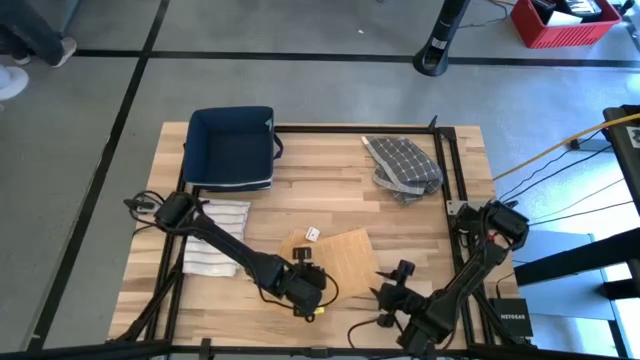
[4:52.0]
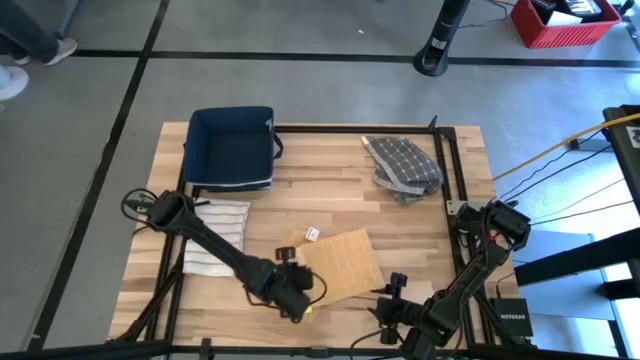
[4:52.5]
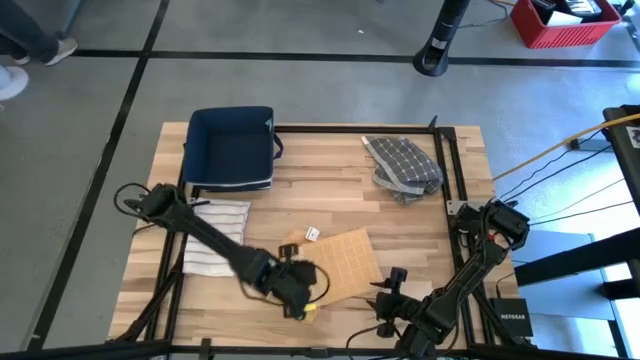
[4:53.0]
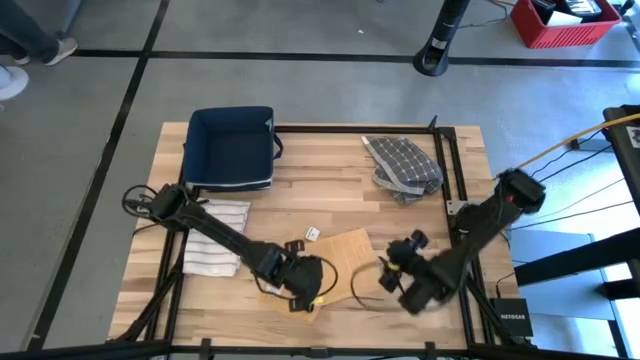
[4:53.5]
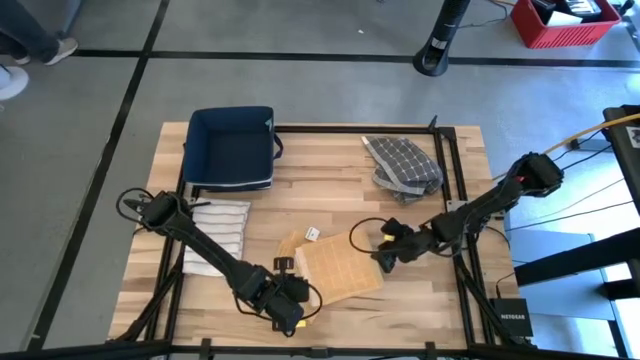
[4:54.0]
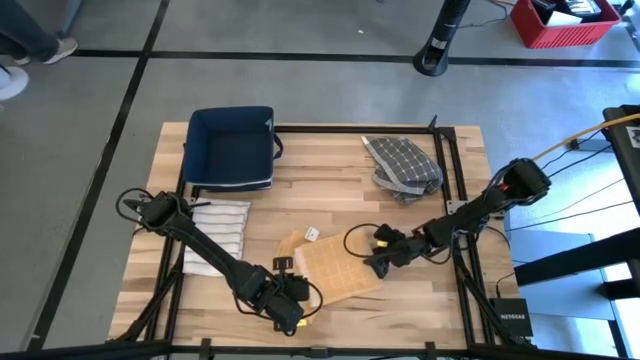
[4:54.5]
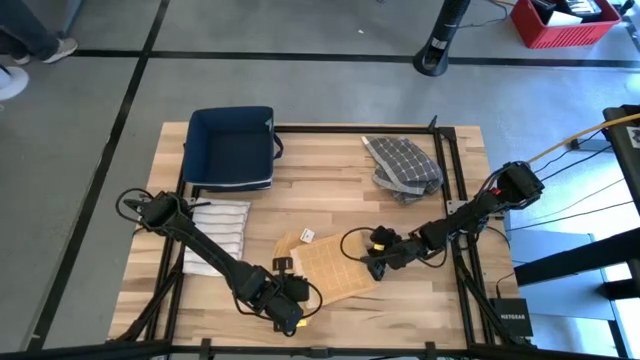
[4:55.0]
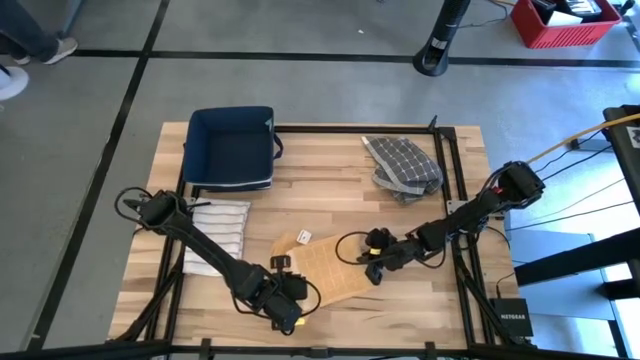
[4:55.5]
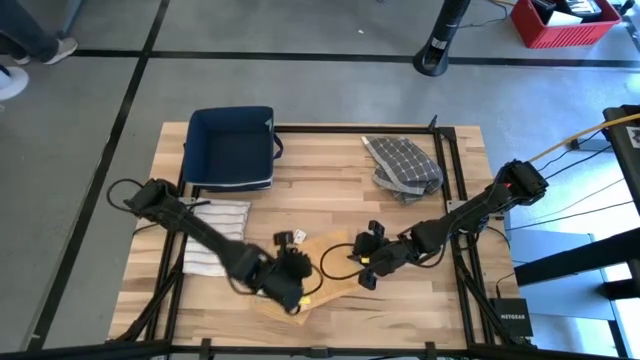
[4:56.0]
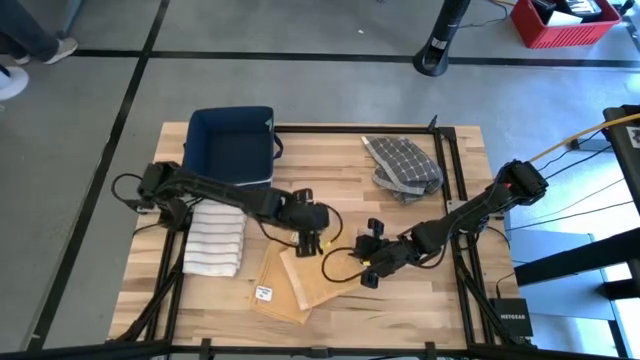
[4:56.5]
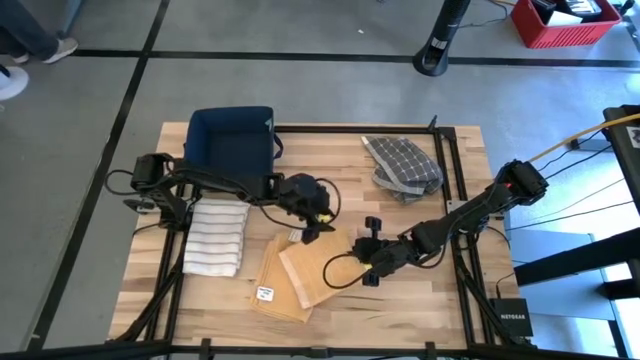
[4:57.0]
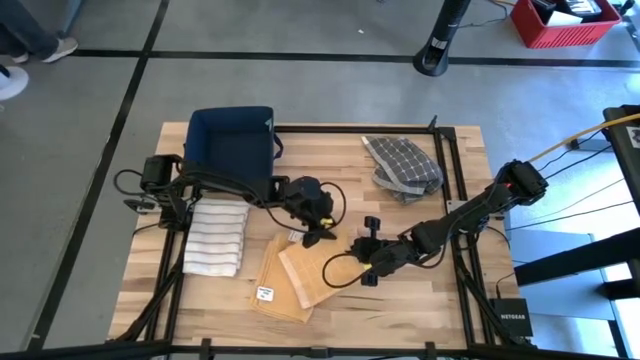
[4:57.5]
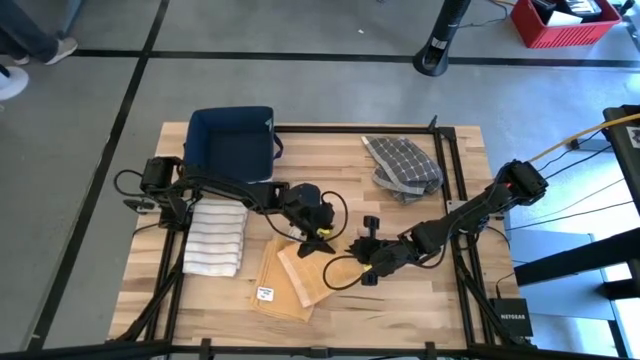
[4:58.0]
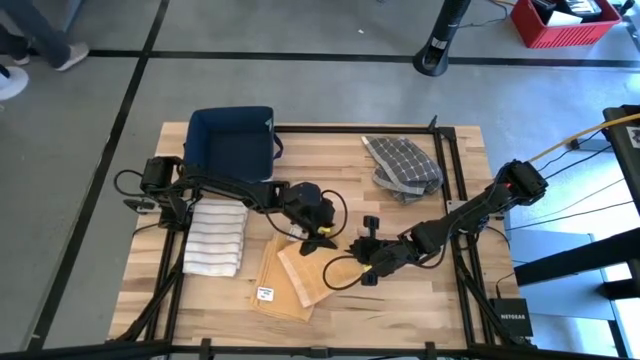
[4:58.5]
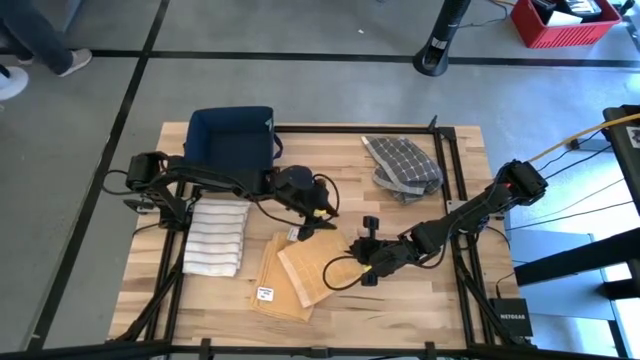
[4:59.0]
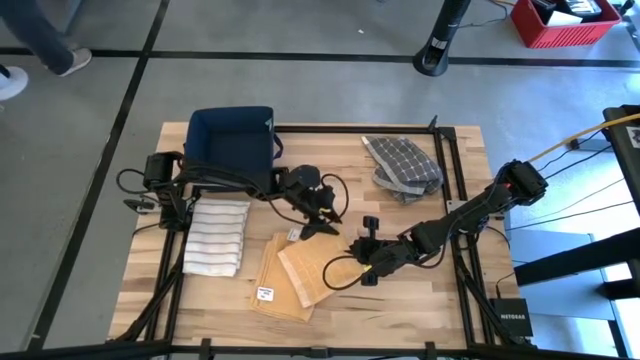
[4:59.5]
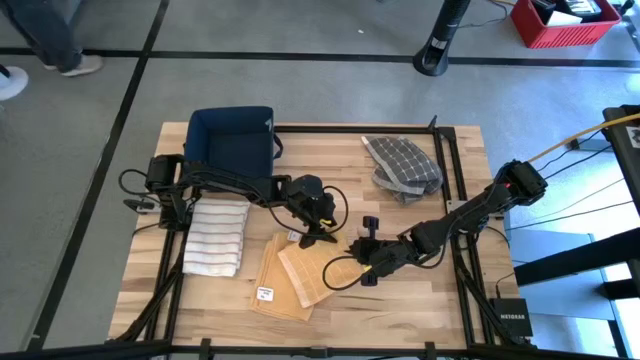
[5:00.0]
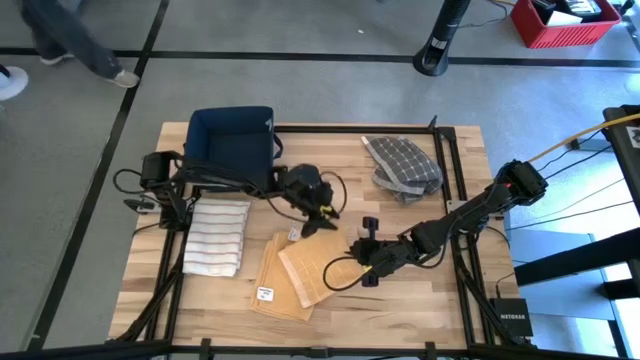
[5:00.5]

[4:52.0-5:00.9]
Task: Fold towel
Stack the orange pattern towel on top of the orange towel

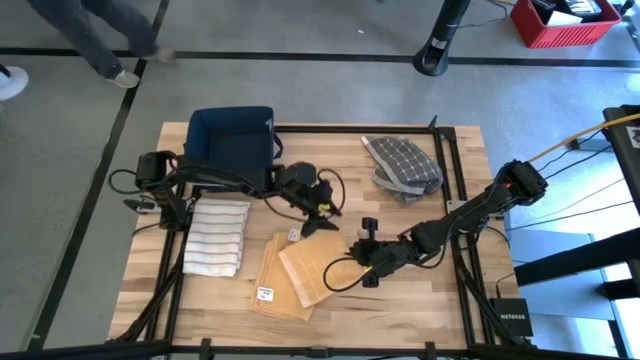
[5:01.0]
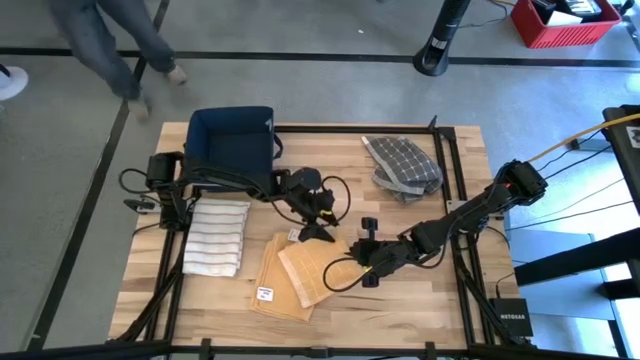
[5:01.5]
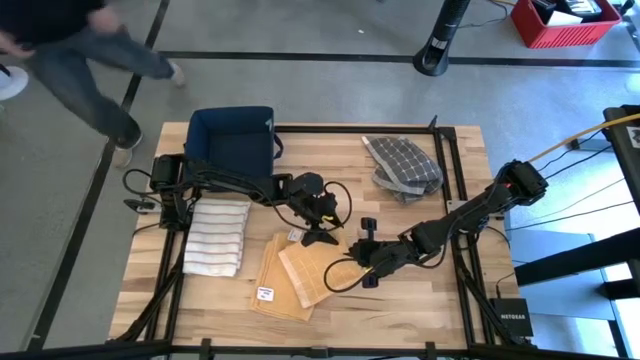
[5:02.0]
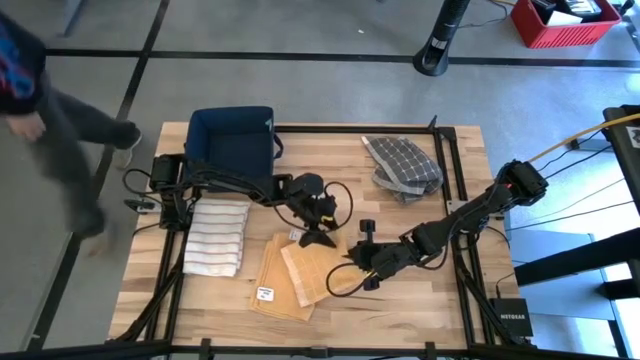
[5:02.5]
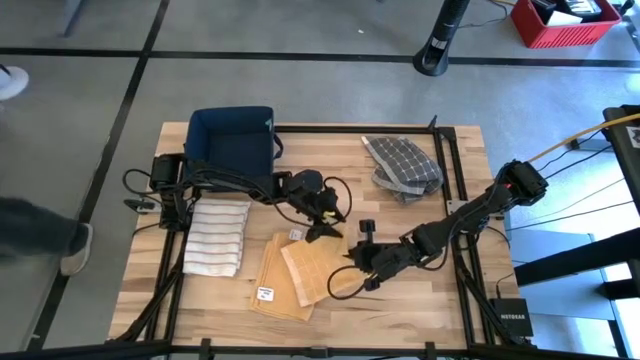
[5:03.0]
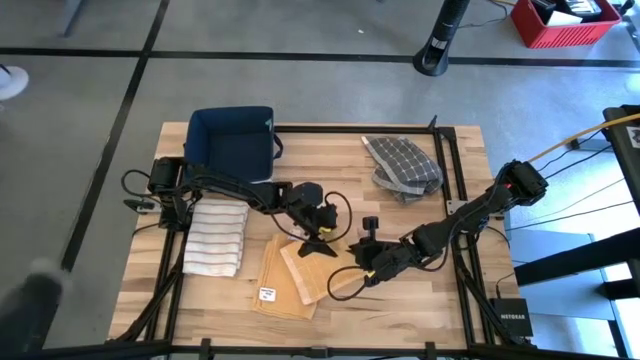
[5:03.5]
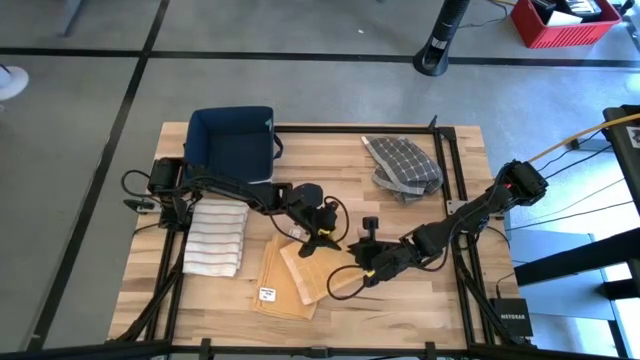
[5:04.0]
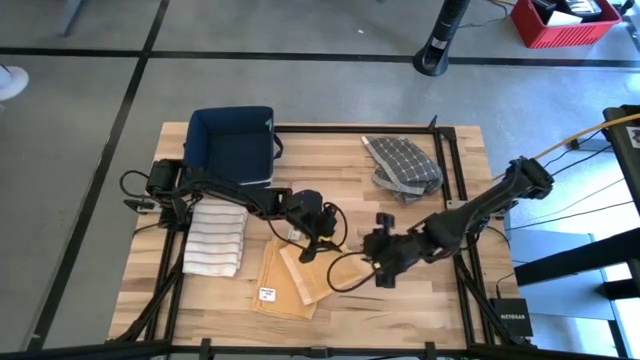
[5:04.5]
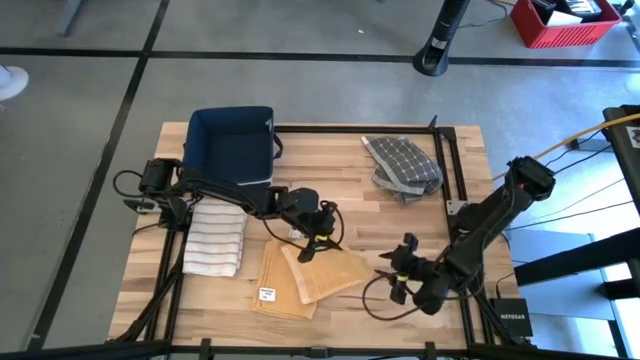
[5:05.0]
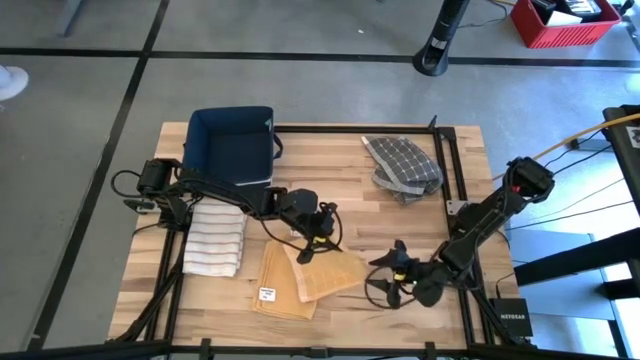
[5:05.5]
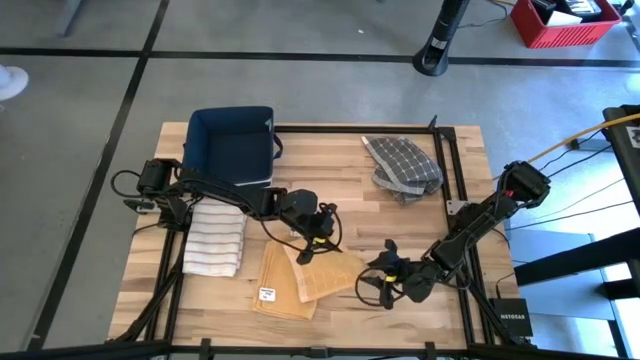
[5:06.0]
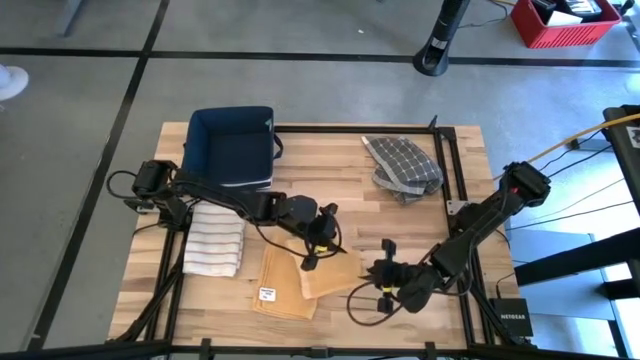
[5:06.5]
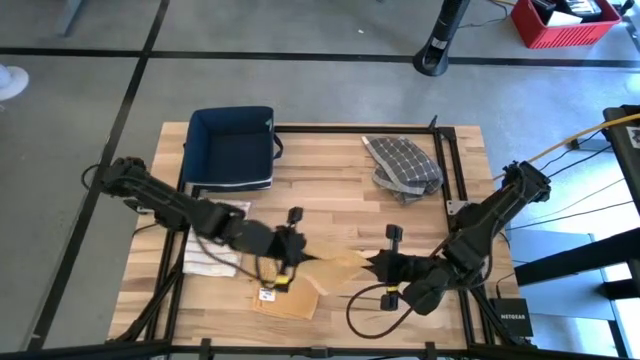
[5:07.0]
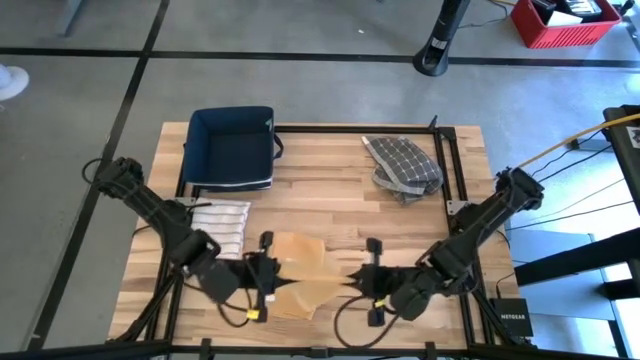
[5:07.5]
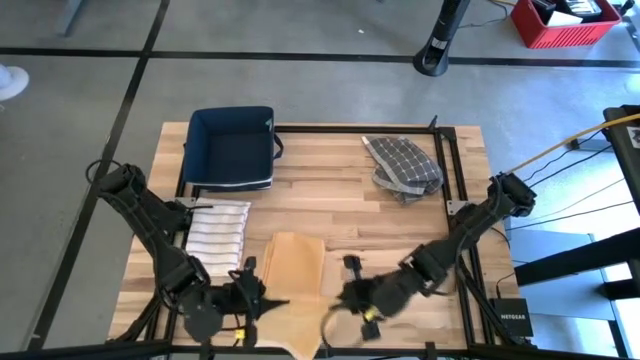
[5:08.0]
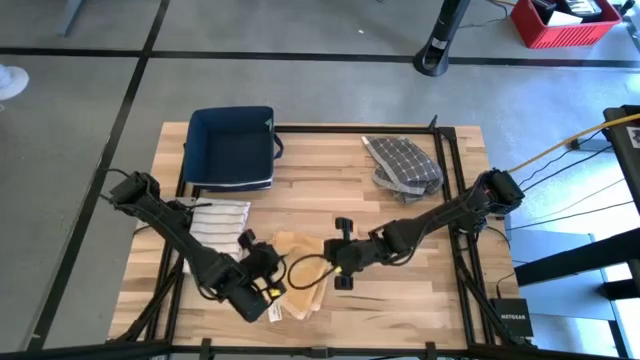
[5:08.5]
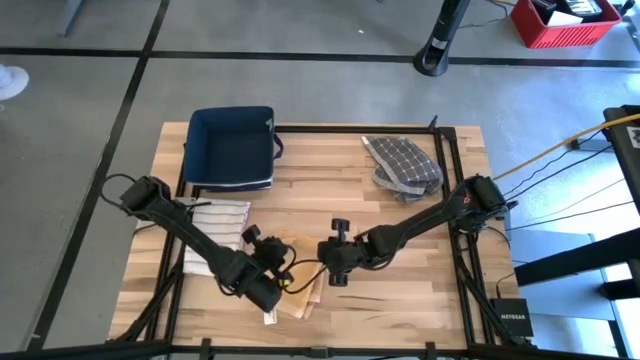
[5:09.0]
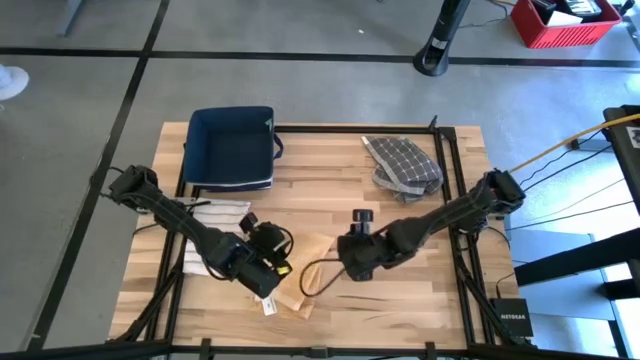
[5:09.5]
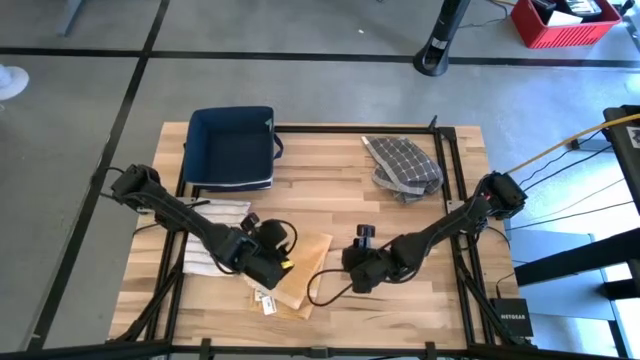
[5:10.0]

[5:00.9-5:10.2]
Stack the orange pattern towel on top of the orange towel

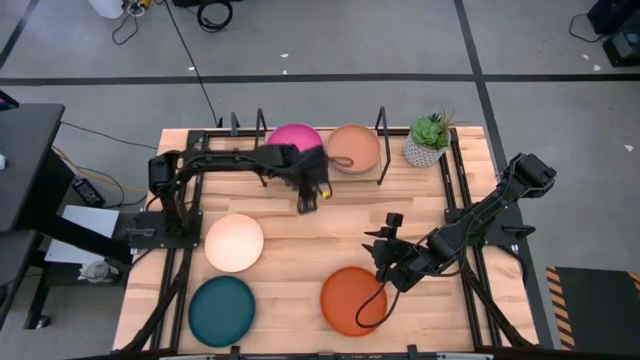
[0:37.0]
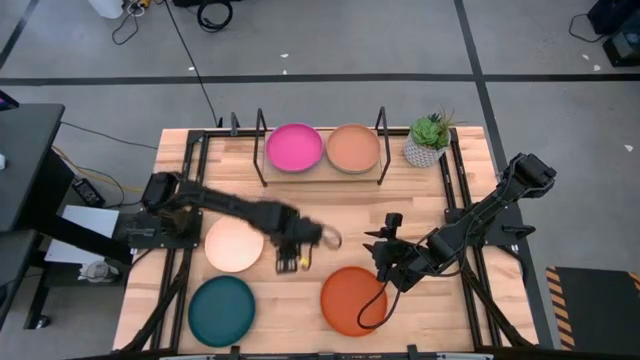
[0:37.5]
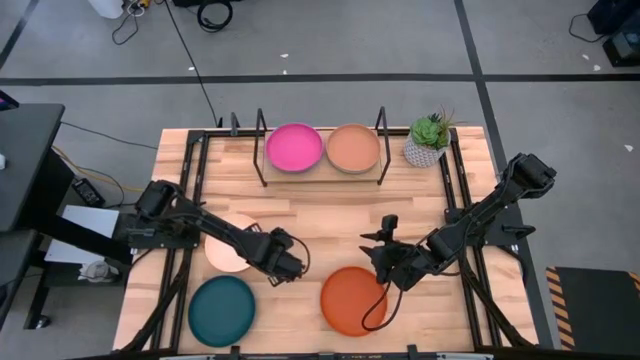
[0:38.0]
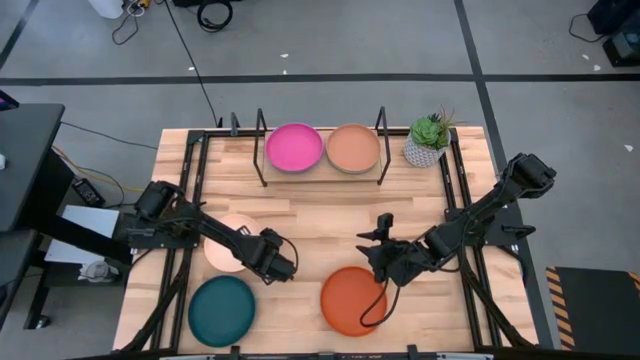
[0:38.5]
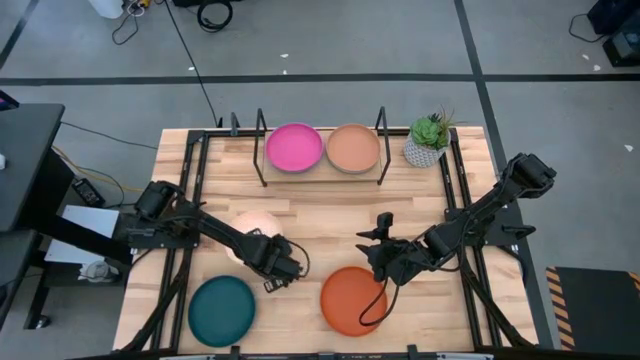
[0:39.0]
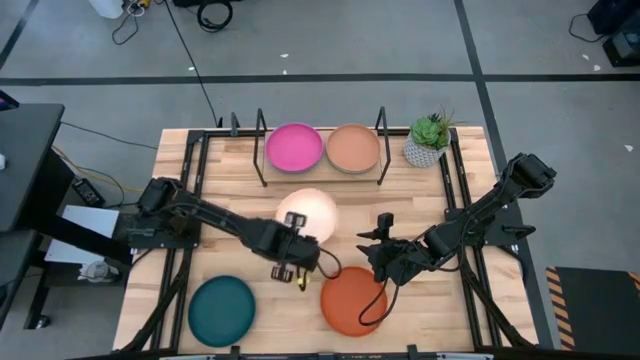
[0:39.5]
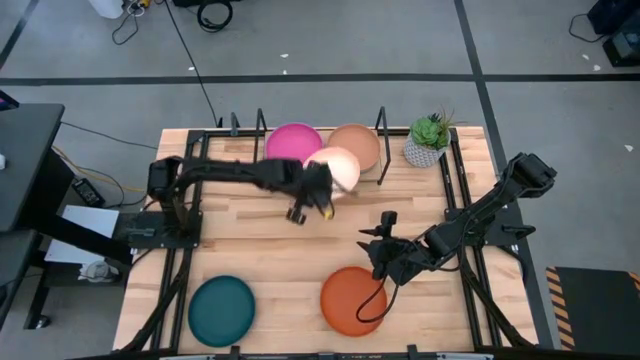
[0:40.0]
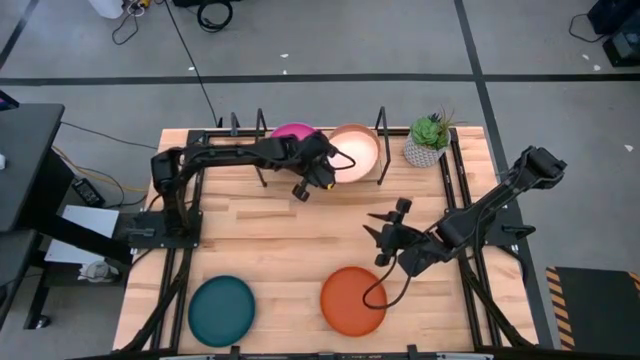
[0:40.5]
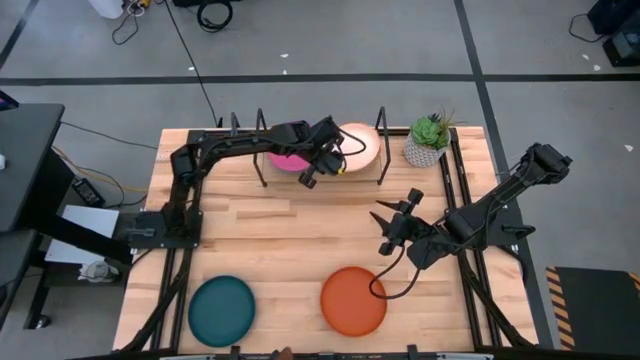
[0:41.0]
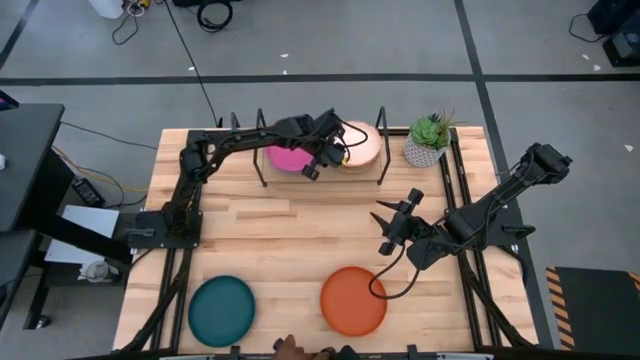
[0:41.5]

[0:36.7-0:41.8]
Task: Place and stack plates onto a shelf
Stack the light orange plate on top of the brown plate on the shelf
